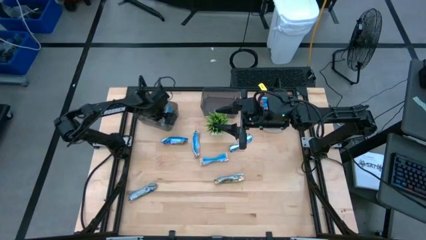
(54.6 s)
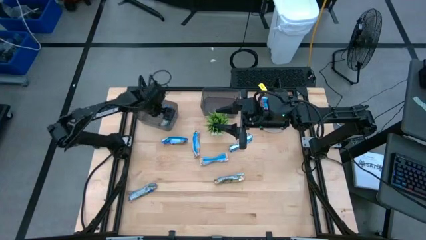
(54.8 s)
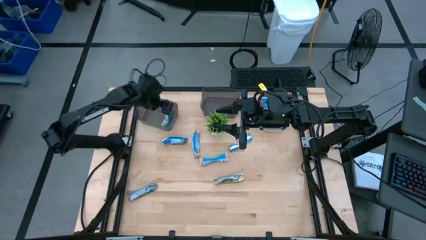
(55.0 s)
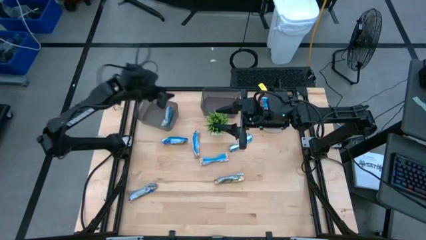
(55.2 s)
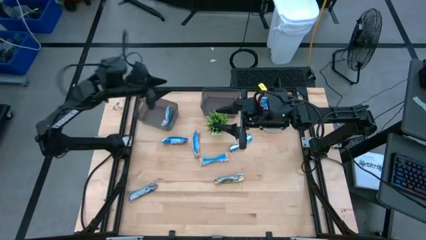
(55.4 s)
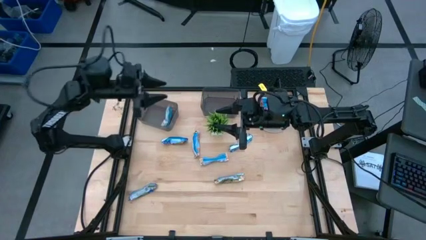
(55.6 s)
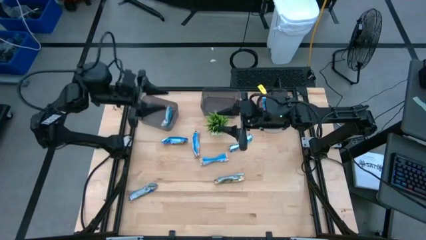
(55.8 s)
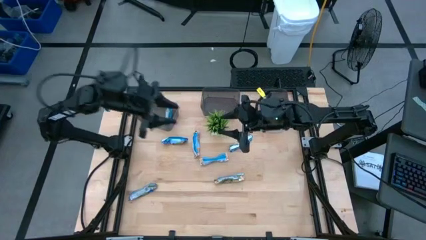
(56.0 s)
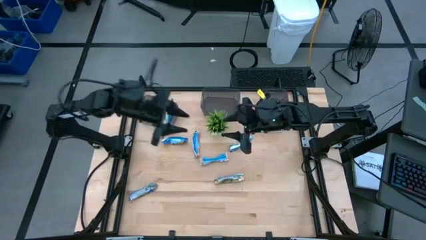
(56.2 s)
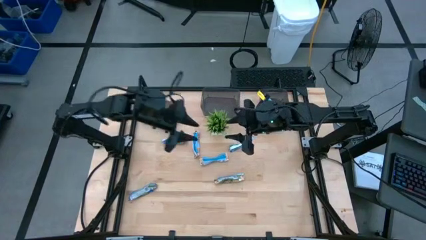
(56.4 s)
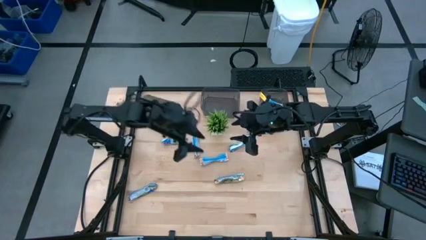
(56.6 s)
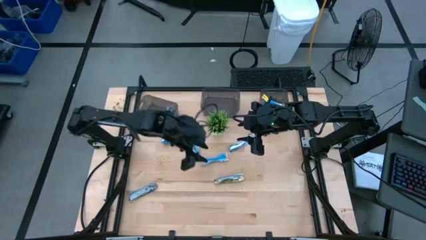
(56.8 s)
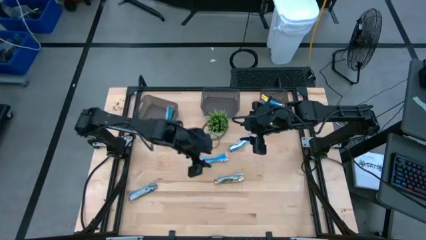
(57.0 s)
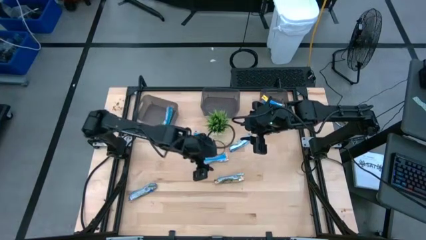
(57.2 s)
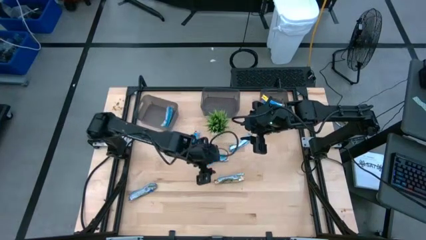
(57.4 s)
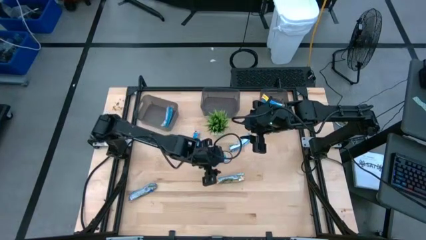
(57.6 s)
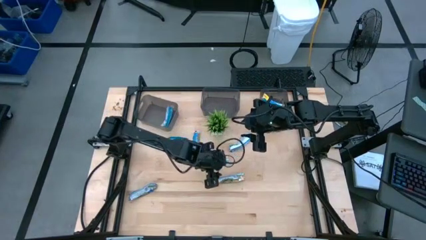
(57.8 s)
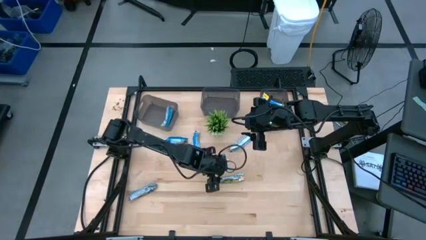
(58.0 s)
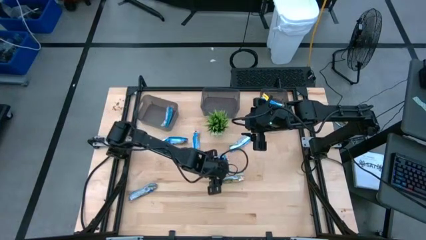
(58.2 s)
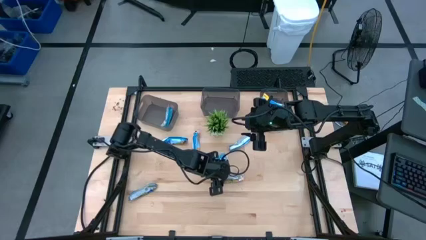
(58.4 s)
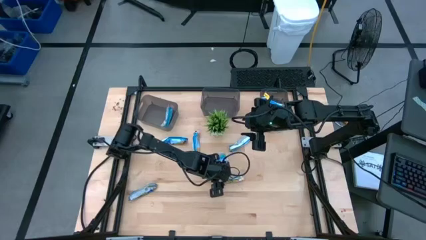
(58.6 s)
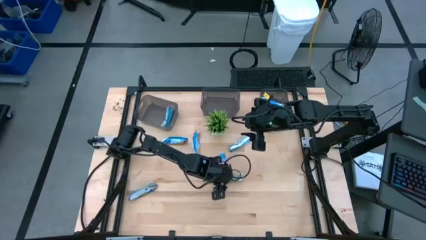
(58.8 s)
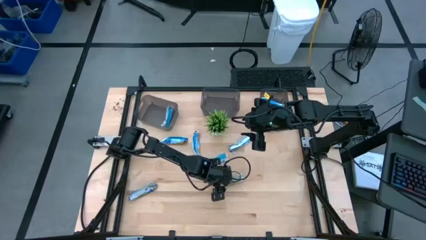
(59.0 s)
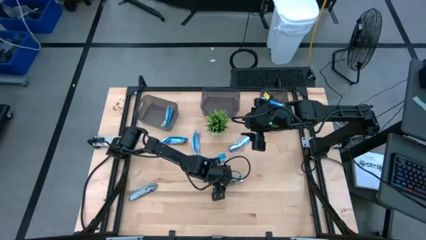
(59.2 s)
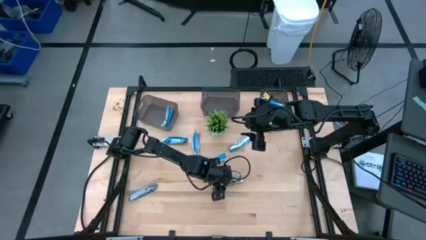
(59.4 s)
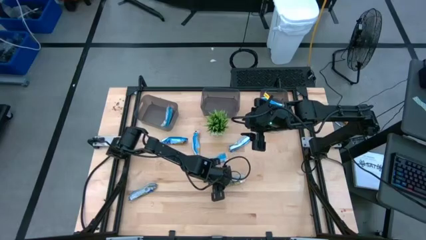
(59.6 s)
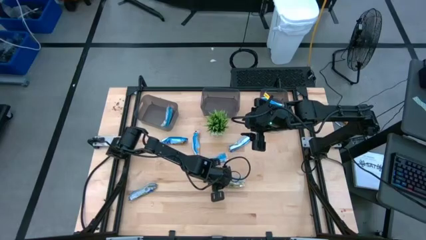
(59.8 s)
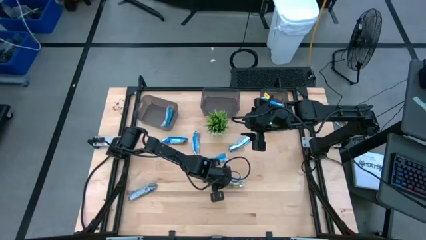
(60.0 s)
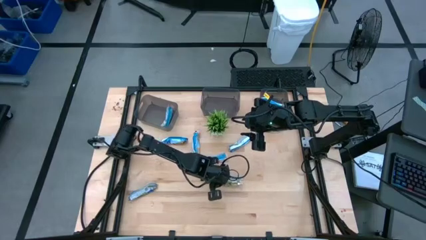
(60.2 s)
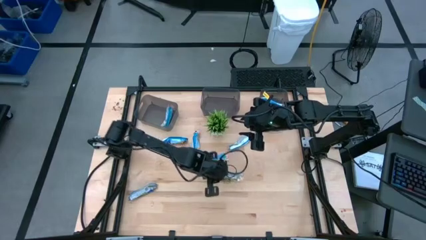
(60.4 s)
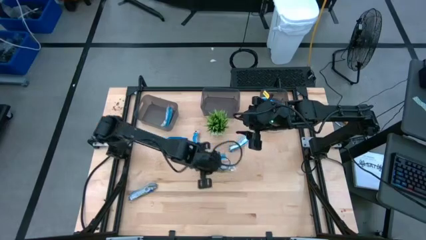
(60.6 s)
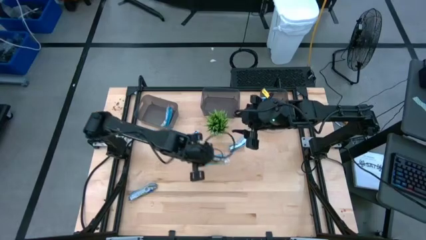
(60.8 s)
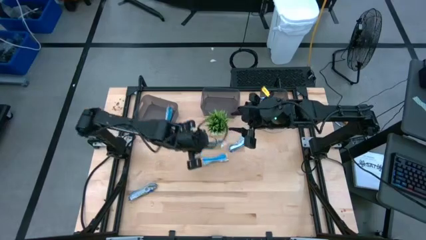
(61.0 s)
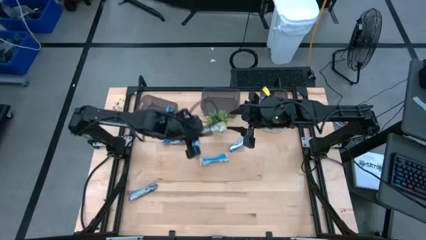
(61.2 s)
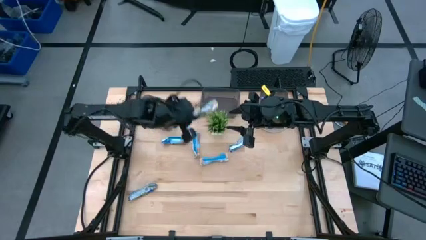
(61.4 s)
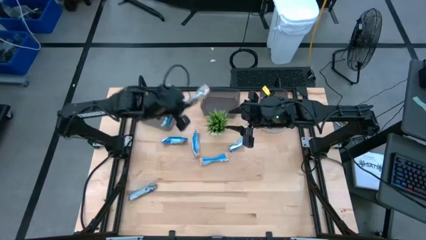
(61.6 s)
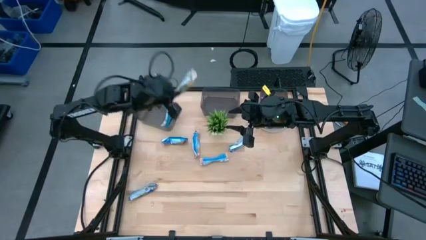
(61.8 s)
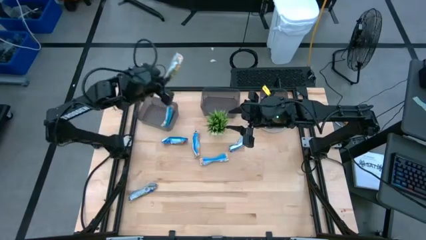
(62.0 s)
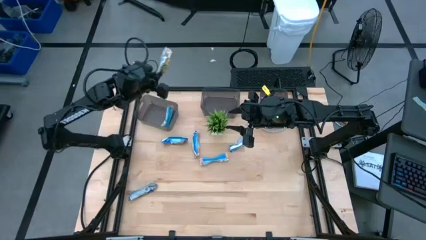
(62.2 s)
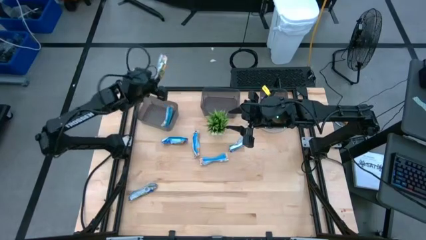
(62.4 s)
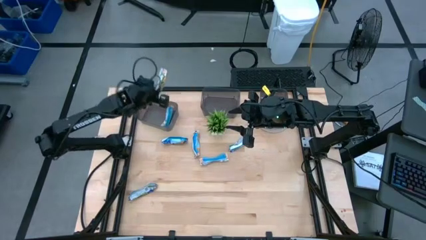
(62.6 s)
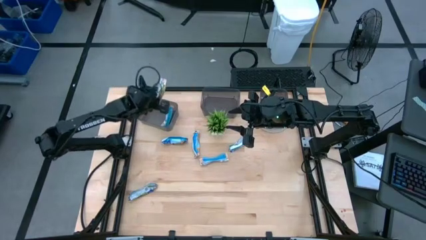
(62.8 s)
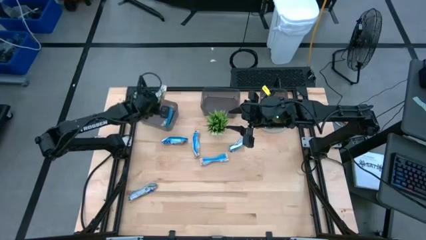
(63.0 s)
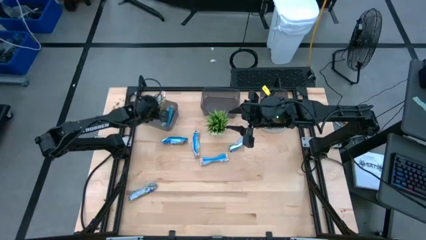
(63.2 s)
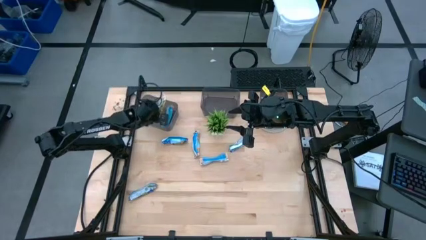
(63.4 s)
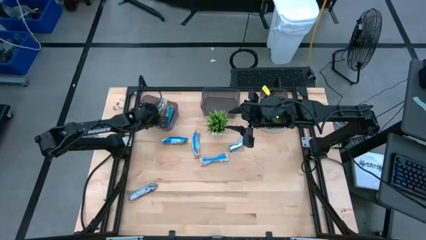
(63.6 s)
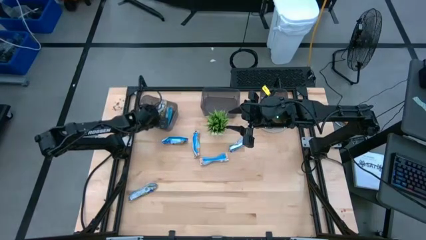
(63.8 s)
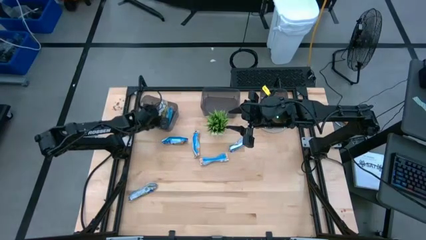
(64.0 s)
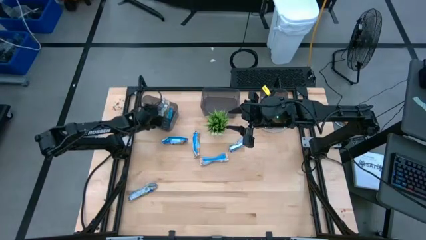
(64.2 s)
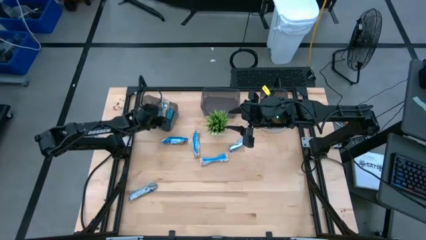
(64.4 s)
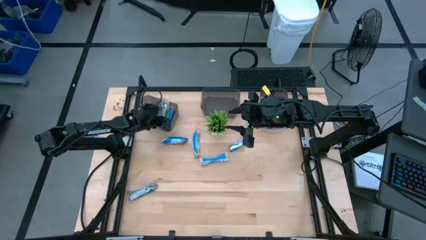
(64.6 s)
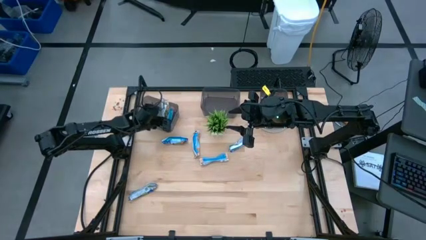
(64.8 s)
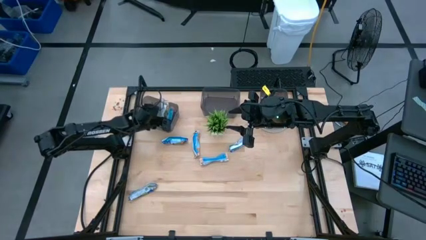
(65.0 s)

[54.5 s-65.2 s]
Task: Pick and place Granola Bars by type
Put the yellow granola bar into the left black bin

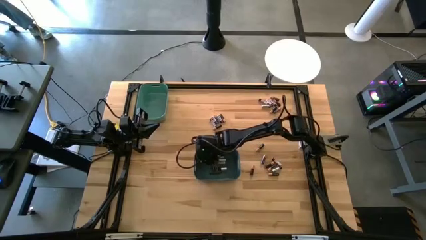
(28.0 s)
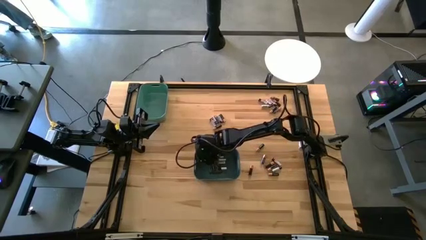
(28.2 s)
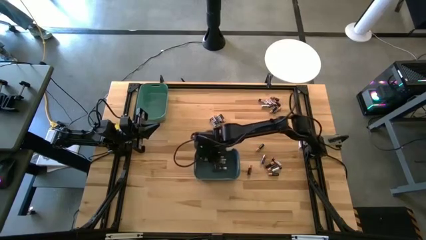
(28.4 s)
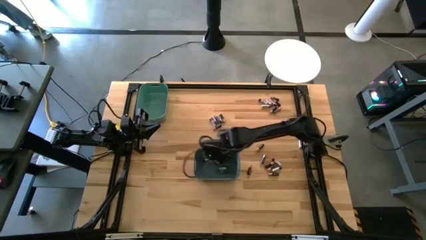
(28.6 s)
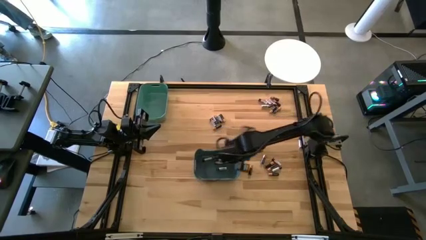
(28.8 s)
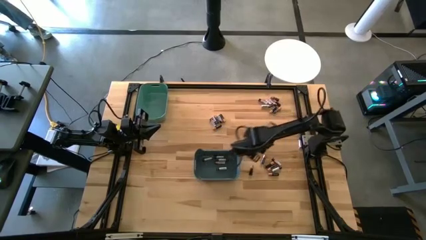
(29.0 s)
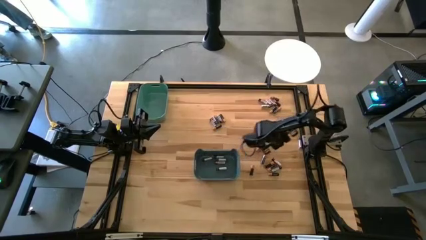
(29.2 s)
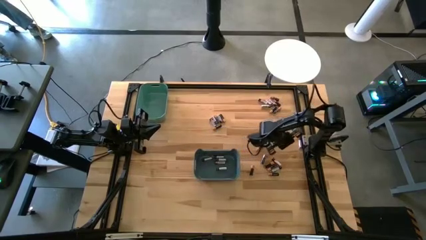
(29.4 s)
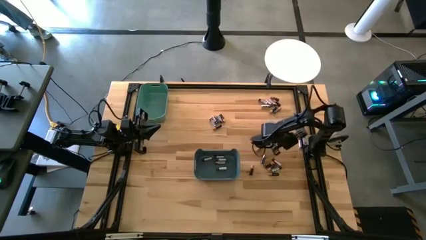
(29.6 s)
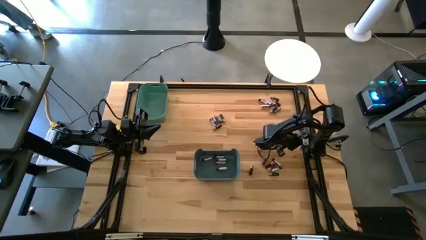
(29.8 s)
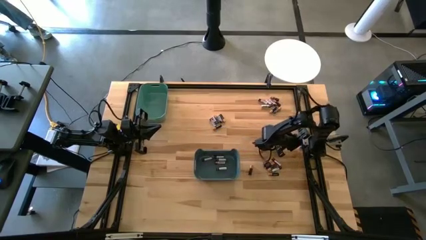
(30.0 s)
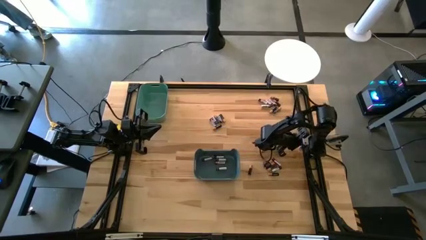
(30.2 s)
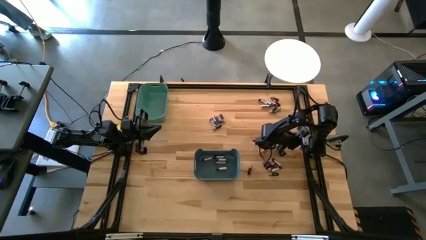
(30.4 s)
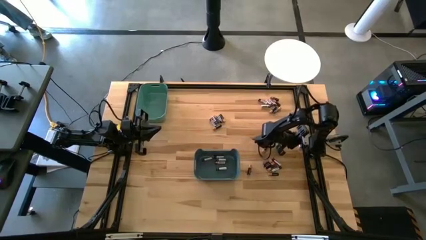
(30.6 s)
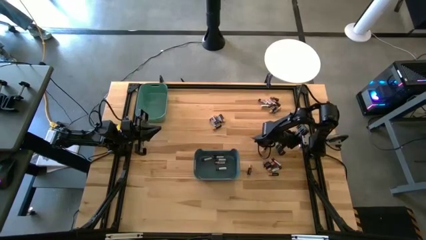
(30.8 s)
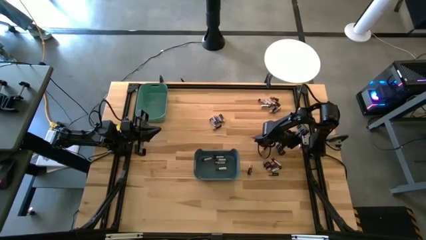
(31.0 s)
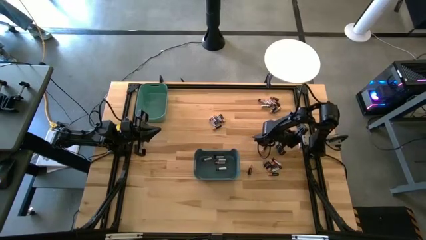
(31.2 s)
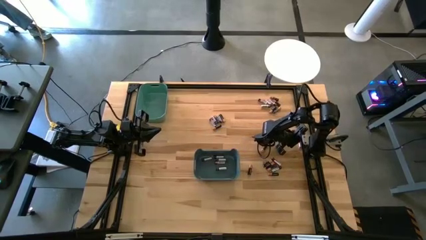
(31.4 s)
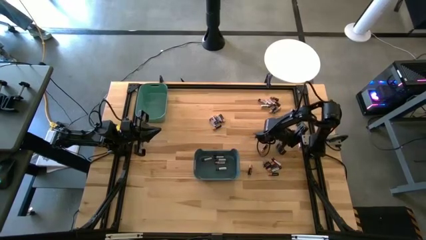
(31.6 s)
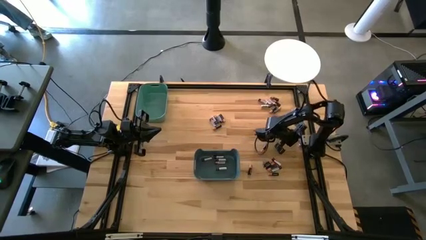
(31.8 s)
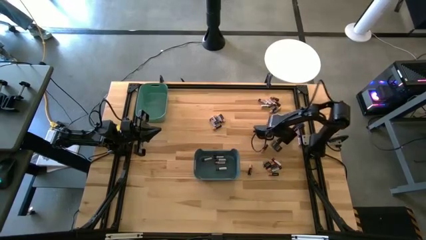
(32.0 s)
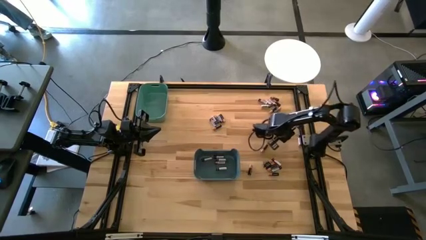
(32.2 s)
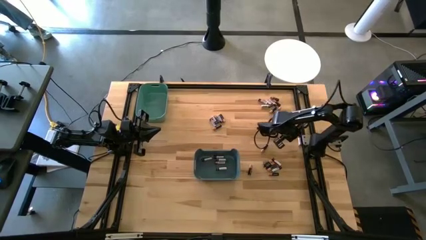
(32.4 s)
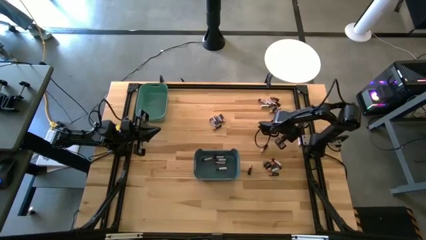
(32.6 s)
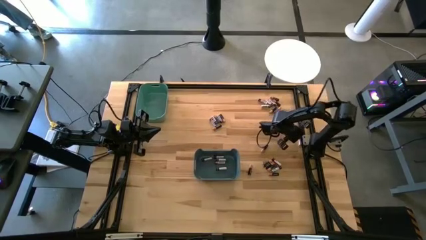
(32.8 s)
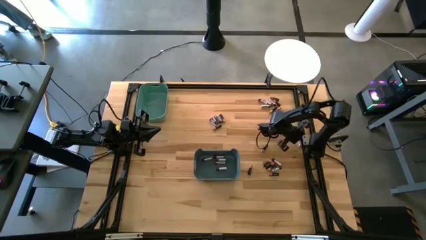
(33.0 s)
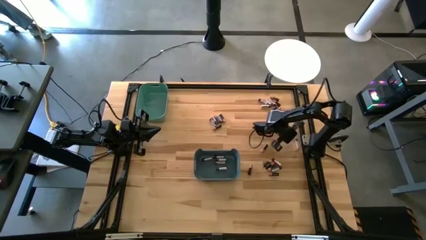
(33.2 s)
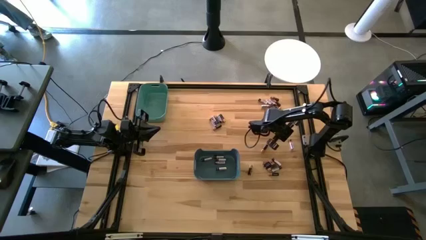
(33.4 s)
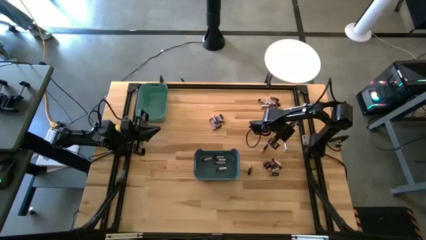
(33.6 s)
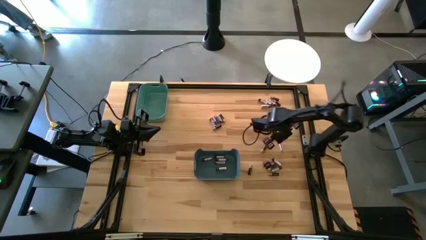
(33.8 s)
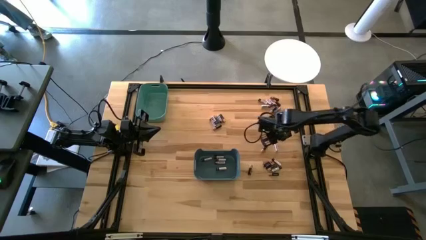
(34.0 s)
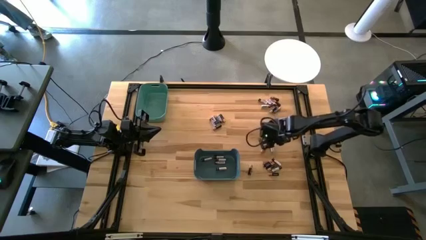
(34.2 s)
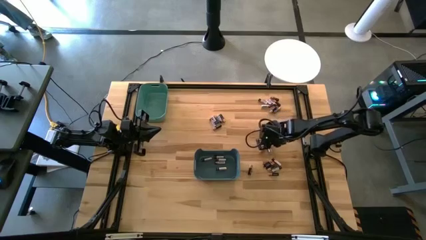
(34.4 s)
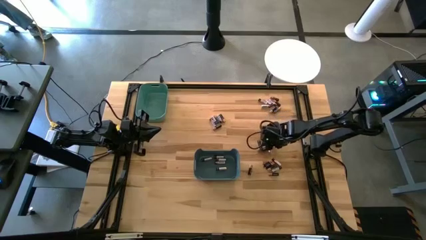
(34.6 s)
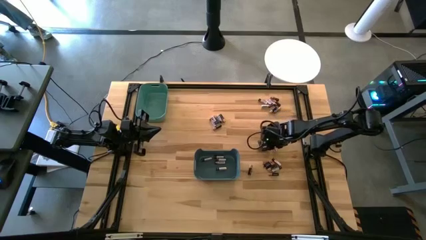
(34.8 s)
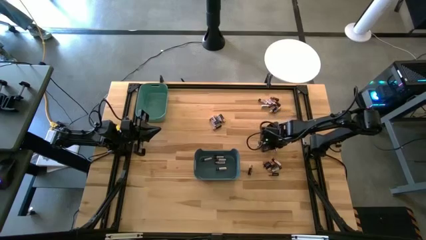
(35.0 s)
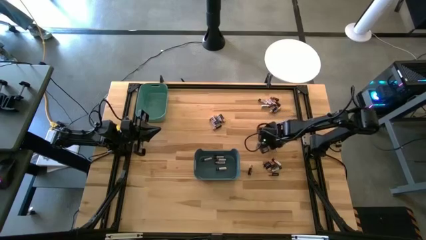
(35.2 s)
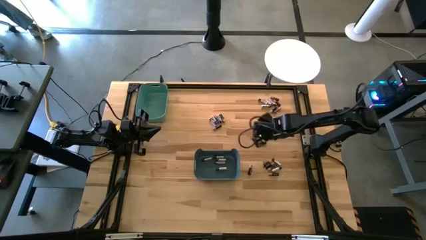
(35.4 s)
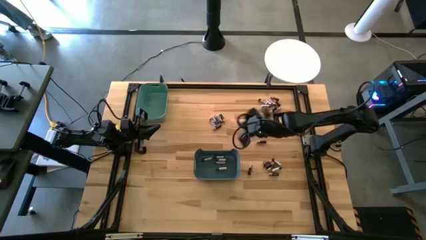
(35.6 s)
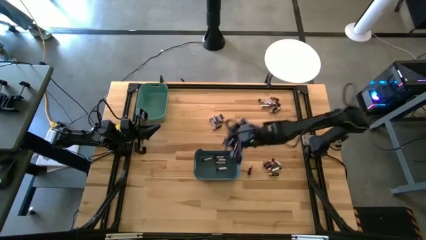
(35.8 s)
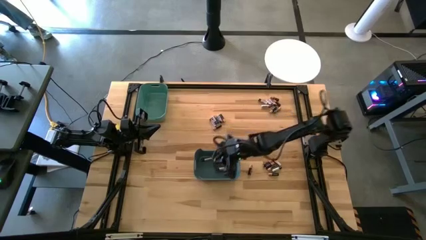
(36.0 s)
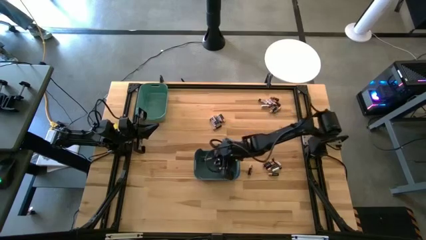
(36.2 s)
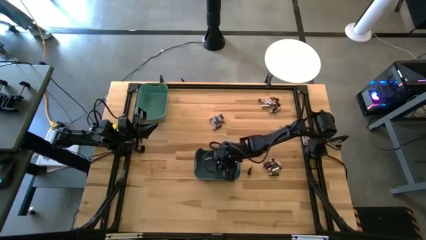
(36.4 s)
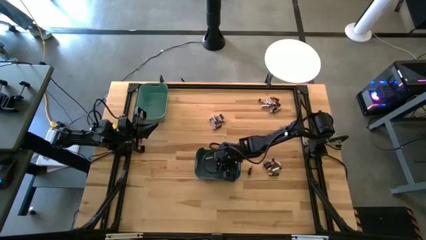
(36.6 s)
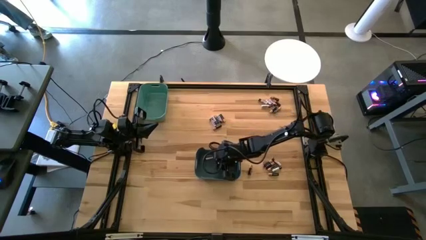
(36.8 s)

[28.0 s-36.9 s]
Task: Sort batteries
Put the silver battery into the blue bin
